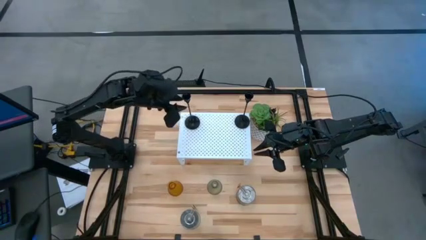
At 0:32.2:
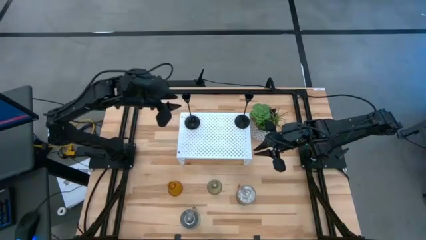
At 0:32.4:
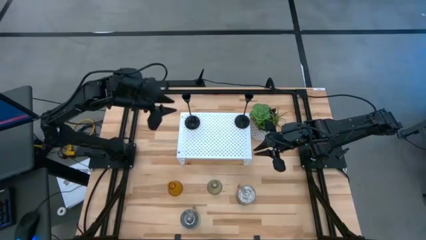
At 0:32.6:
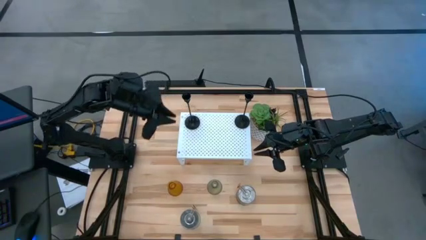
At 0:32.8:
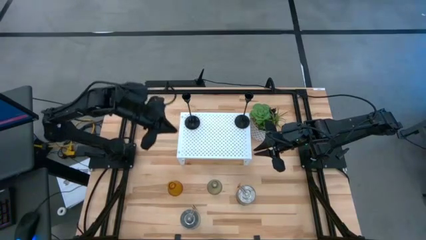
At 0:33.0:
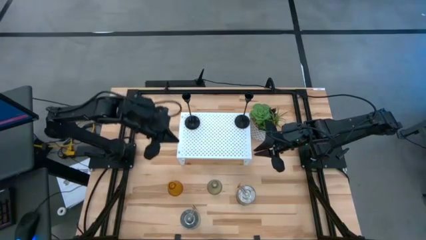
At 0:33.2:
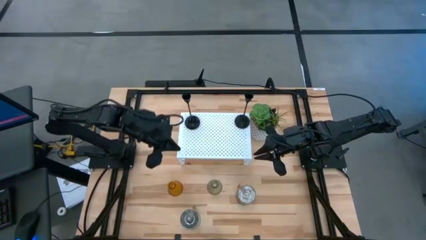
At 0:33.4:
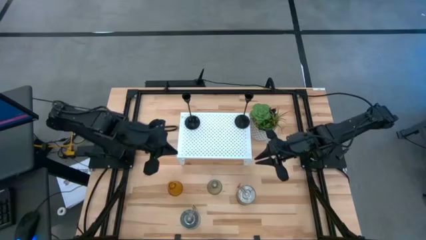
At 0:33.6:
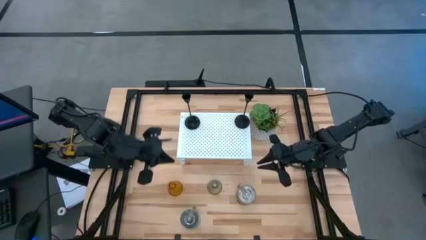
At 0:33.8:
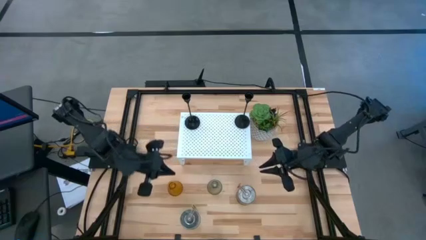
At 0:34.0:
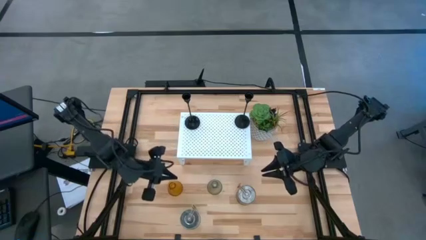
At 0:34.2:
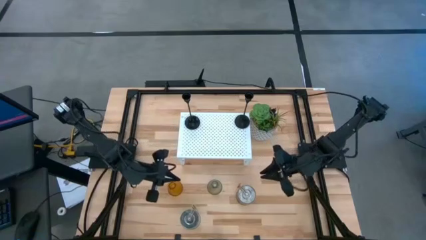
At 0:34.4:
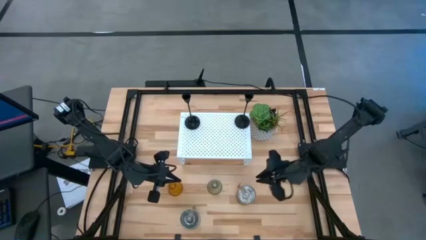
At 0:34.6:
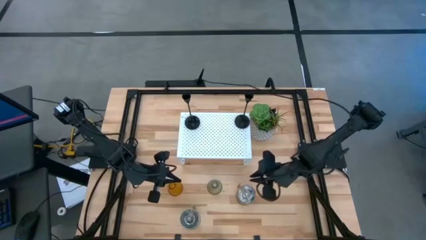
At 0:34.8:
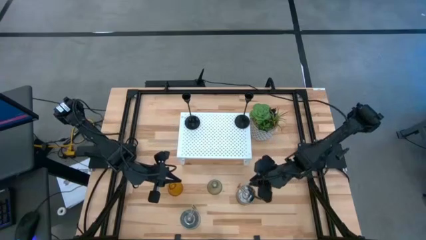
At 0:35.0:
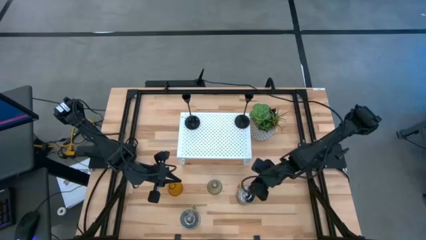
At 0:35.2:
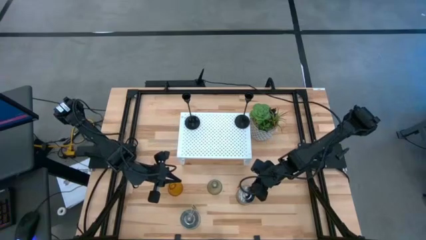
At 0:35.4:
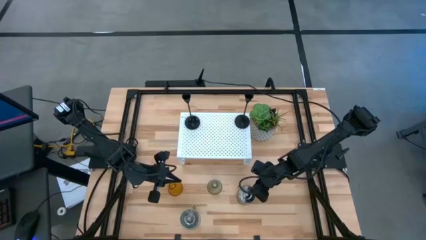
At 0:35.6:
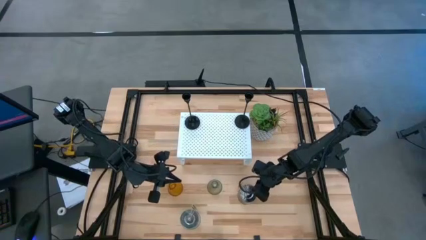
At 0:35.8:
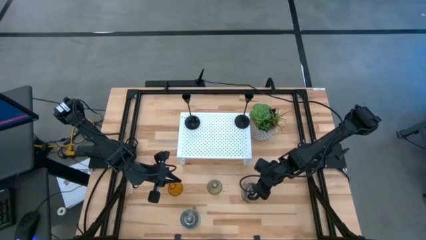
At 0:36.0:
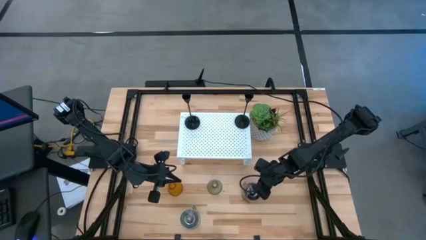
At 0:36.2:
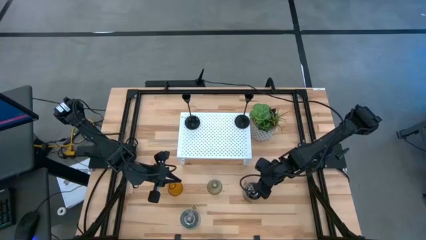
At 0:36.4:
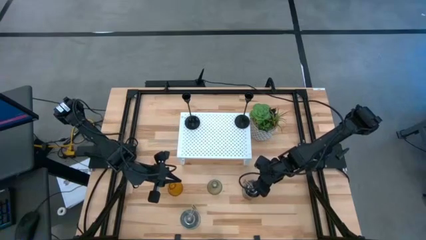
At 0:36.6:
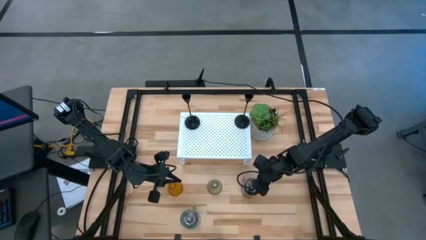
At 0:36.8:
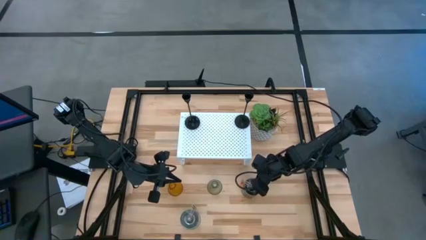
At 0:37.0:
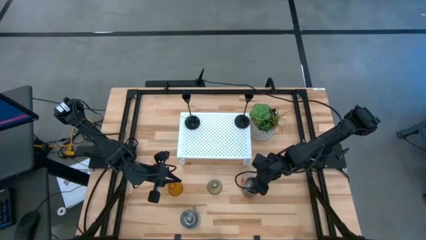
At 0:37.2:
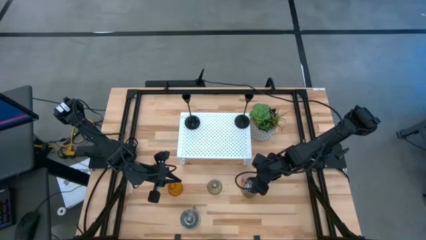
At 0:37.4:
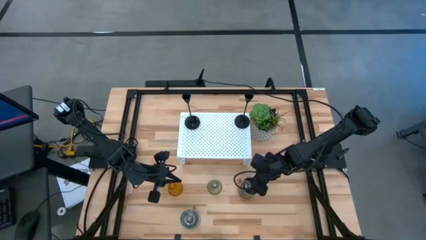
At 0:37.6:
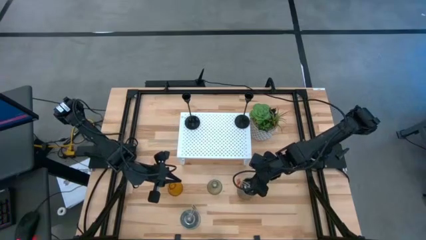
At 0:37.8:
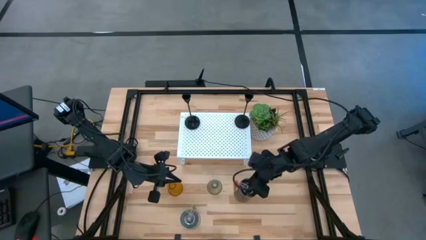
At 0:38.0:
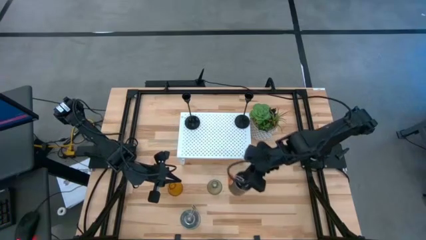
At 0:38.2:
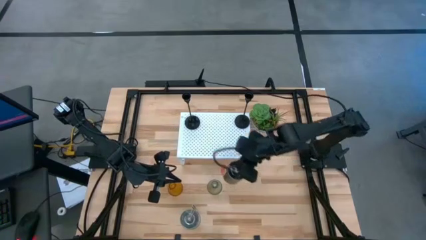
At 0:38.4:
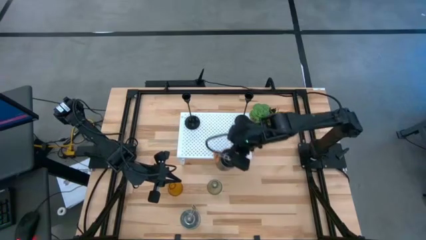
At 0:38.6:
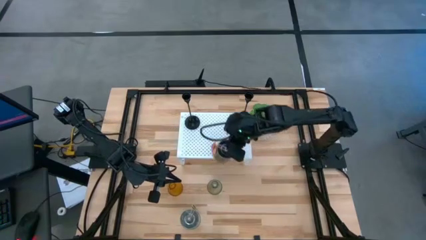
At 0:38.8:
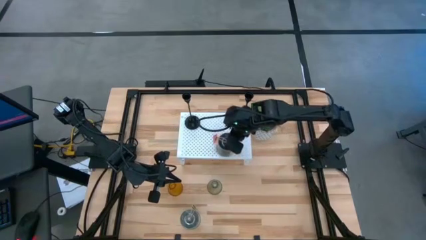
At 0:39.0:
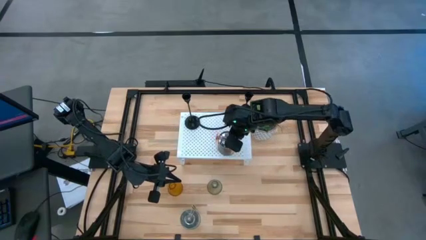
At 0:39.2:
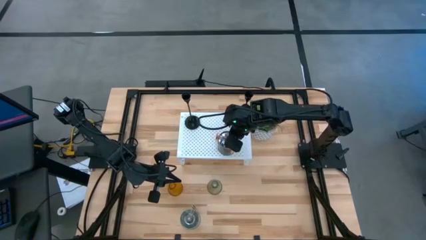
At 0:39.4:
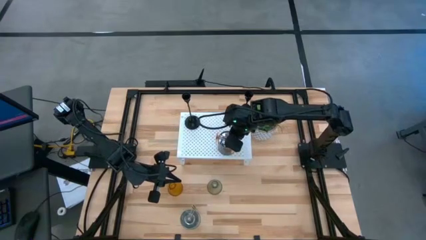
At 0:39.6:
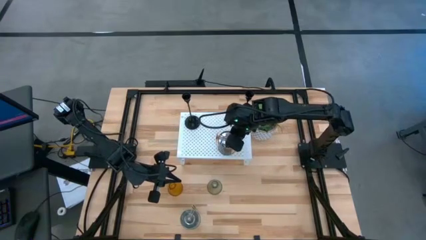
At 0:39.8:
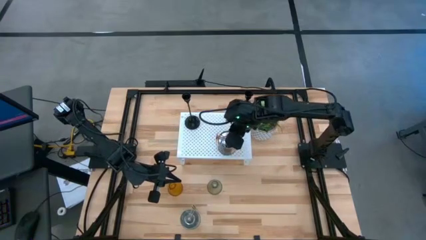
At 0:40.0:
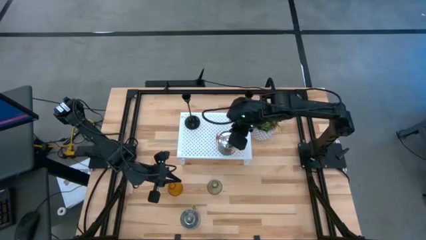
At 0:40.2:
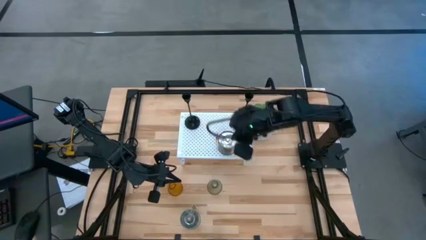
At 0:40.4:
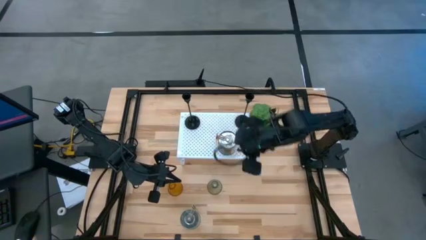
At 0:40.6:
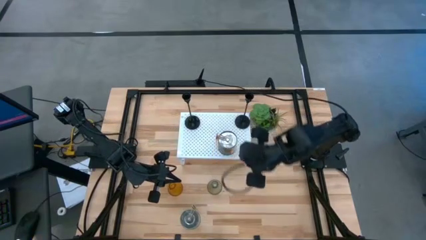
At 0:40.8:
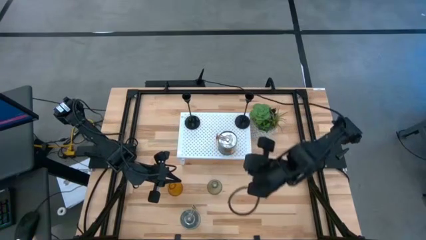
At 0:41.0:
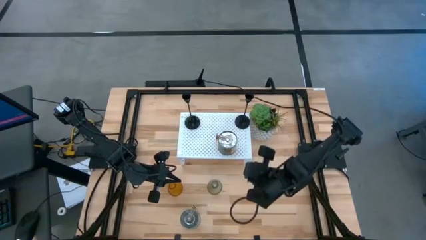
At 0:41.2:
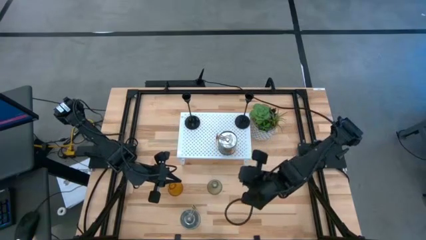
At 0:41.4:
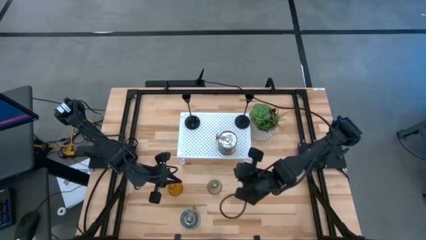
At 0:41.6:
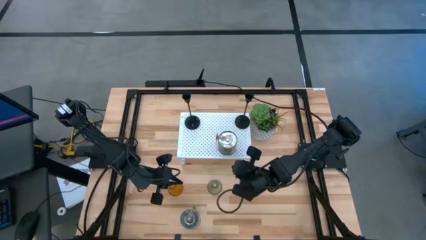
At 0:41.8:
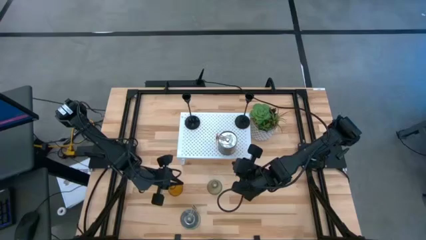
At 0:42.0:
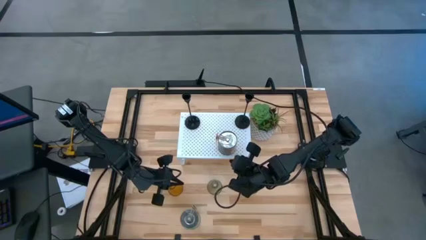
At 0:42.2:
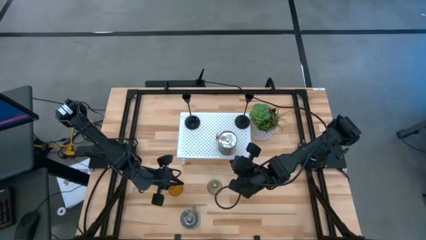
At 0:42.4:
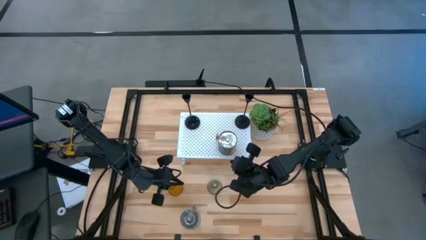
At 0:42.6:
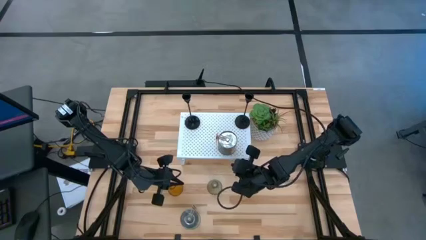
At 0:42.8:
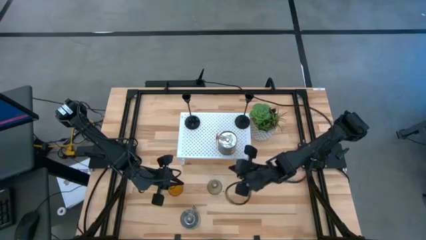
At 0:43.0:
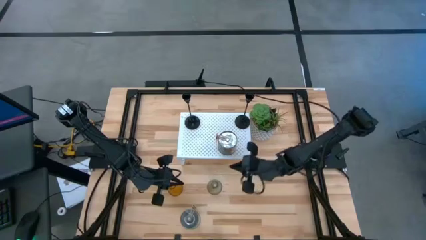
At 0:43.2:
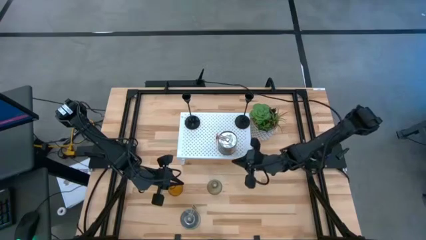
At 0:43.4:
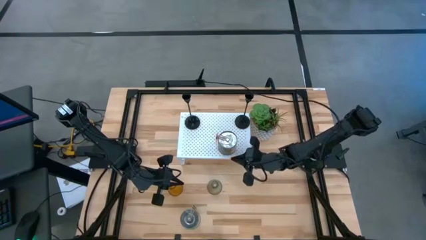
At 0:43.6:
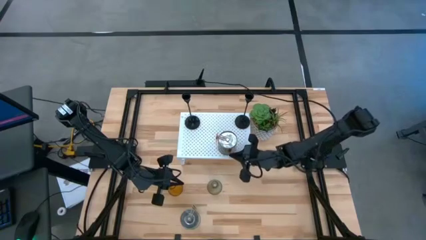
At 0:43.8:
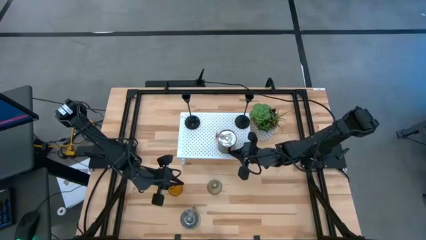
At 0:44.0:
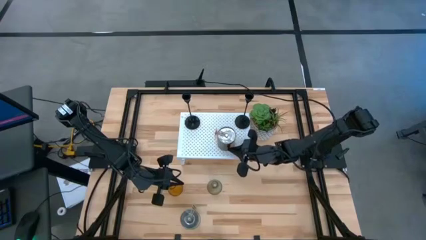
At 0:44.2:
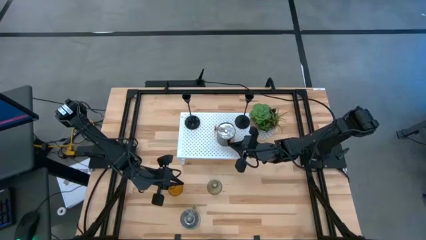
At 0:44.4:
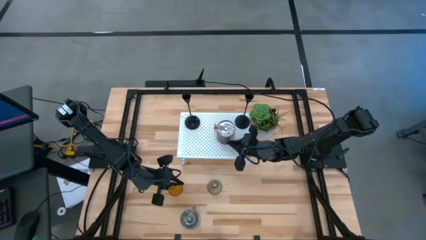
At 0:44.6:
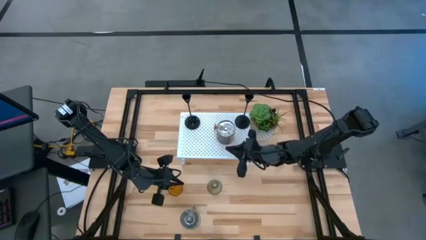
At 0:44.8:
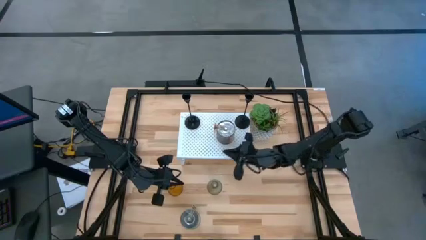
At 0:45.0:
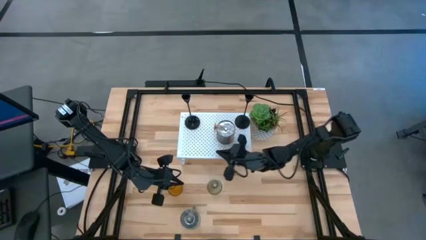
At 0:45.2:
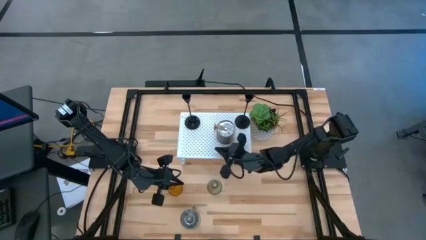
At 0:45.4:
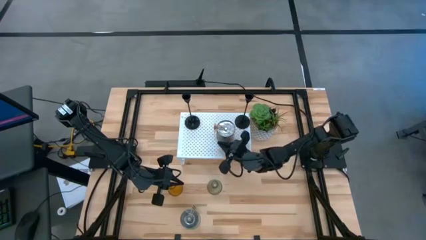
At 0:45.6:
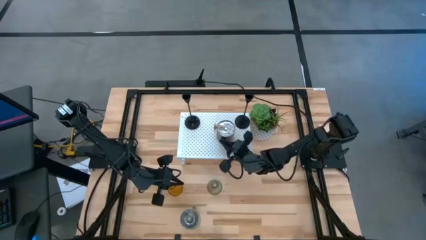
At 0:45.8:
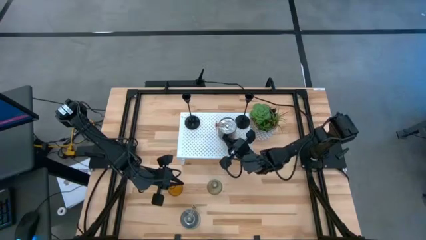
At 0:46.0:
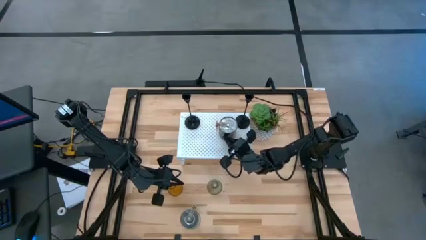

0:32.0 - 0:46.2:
Task: Pick & Place candle stick holders
Put the orange scented candle on the shelf
